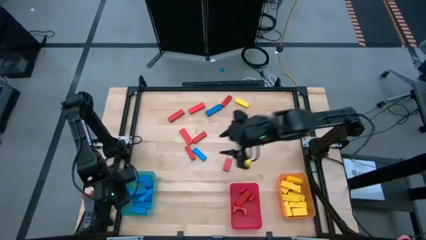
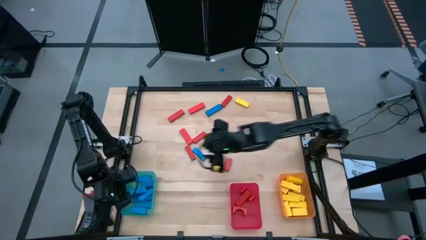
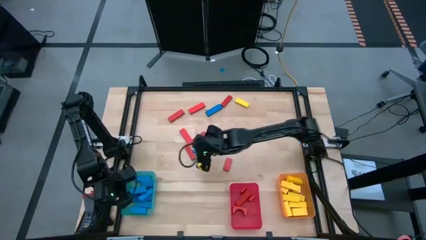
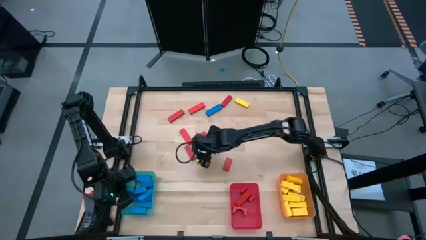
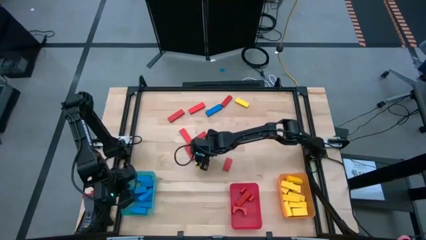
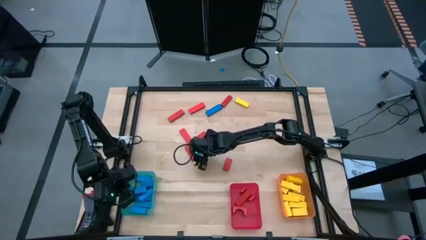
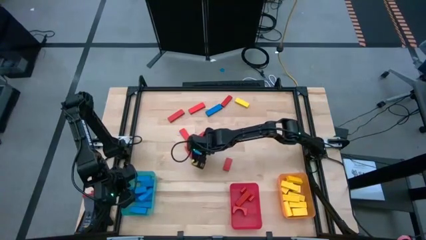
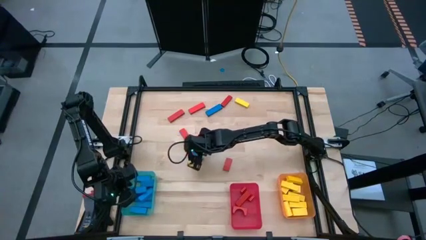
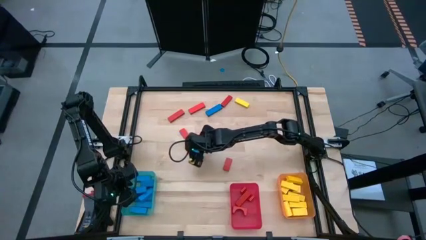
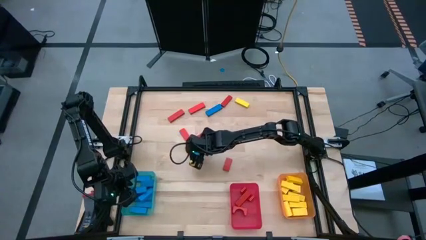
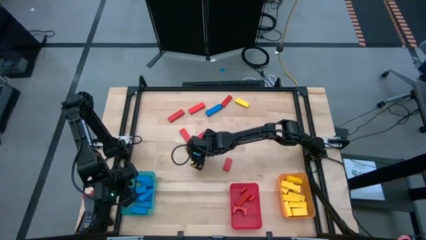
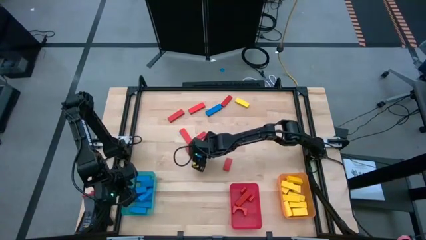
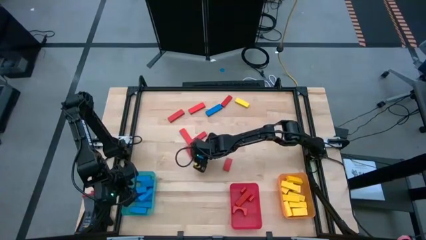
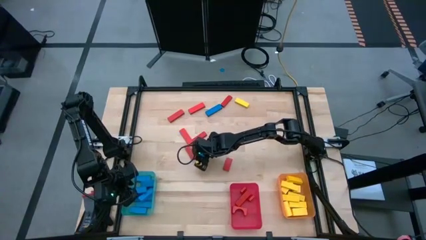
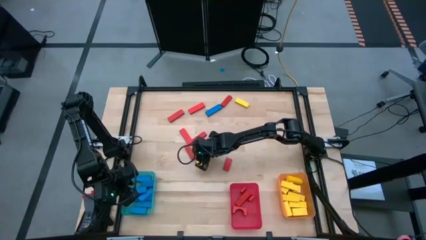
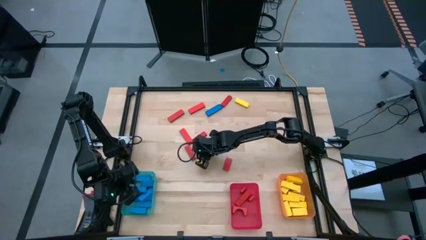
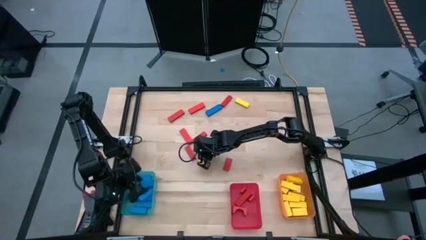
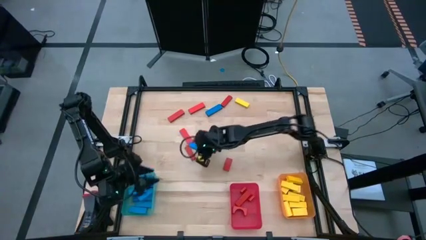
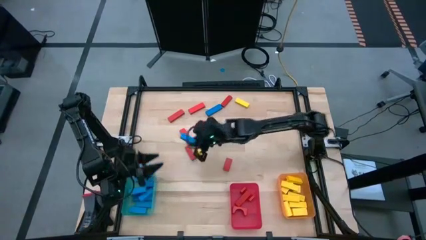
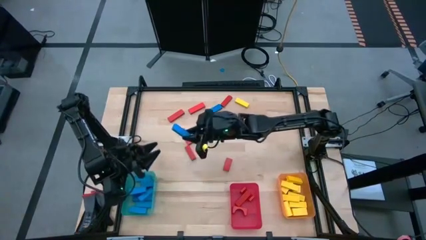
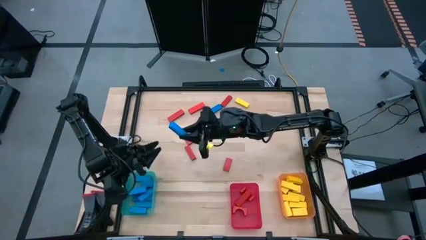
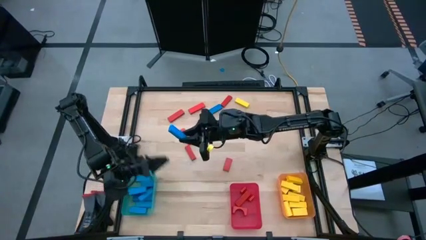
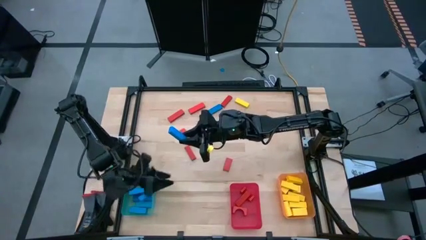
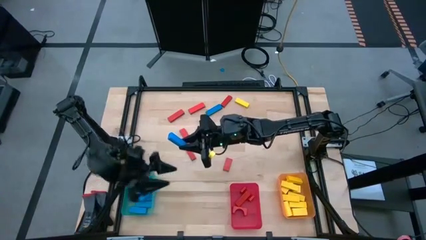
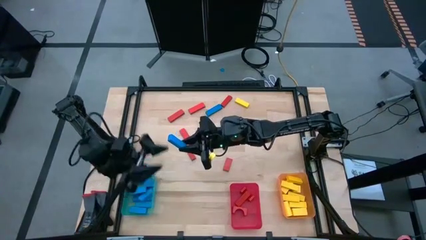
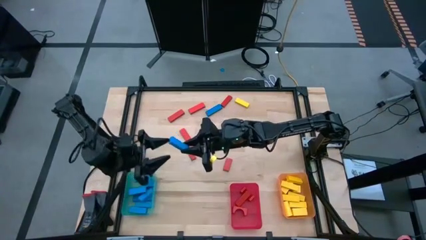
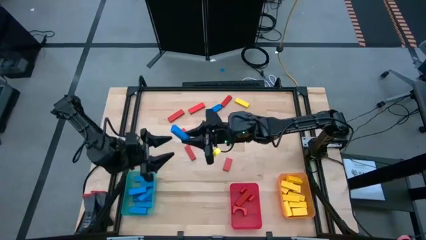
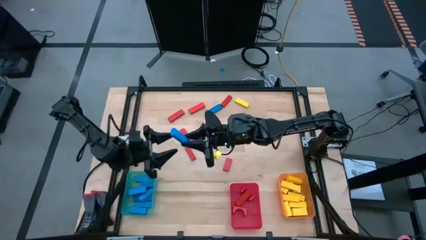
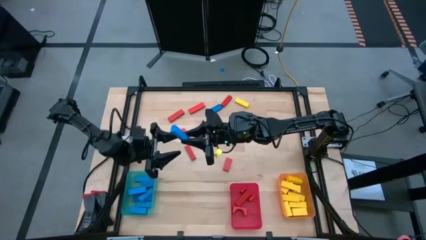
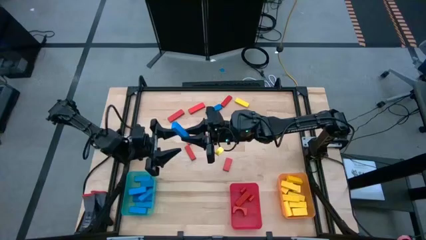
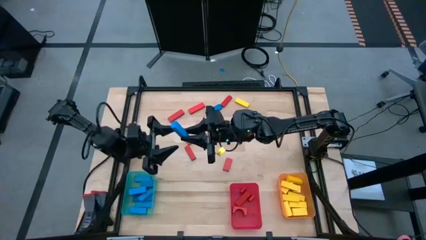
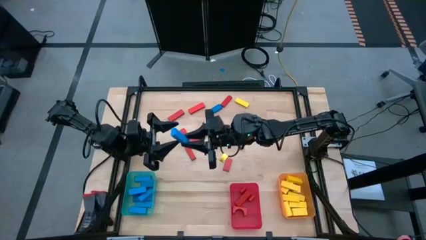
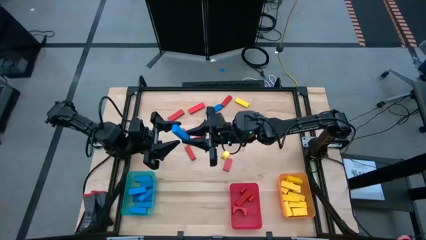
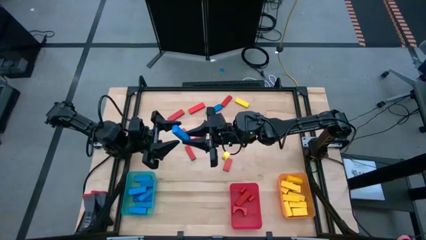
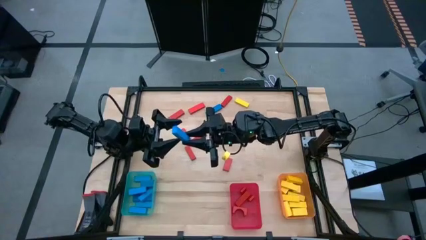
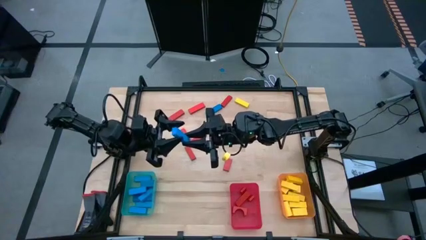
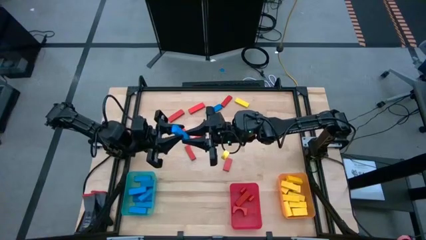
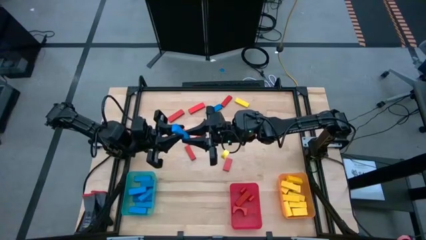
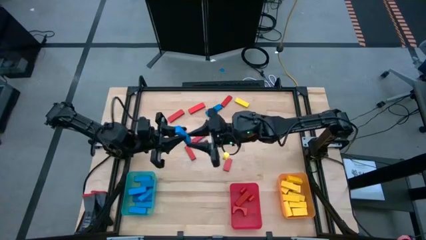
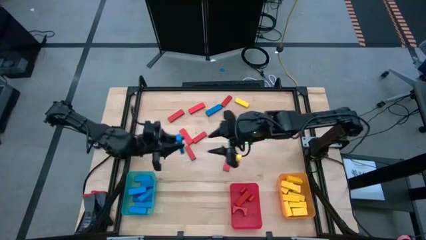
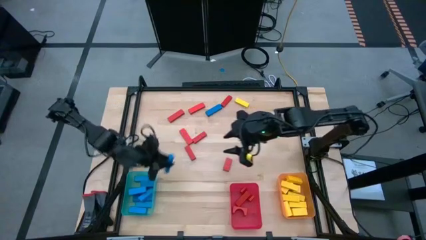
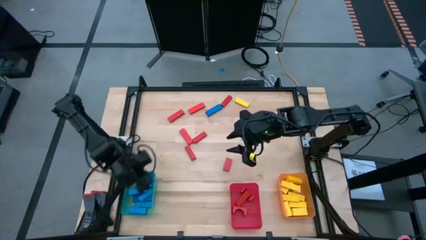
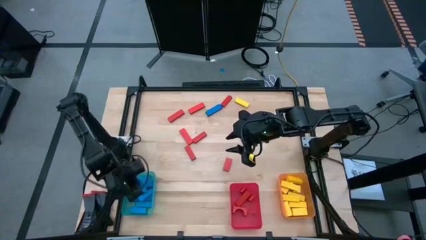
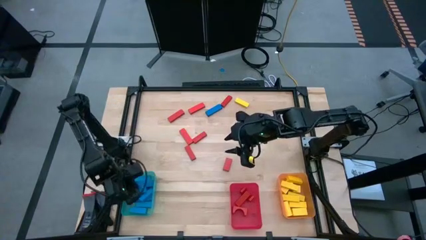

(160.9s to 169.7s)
Task: Sort blocks
Put the blue block into the blue bin

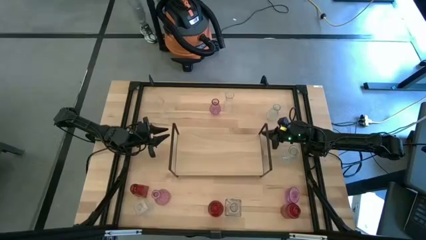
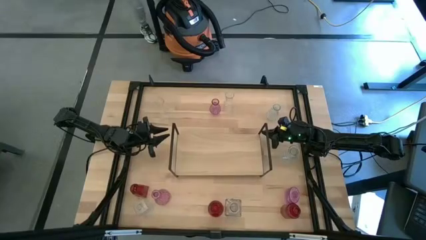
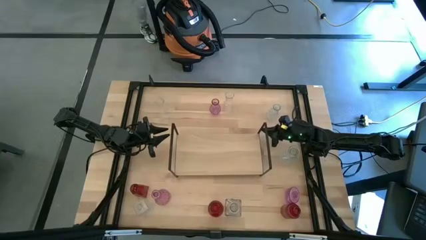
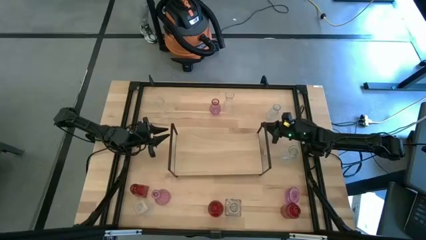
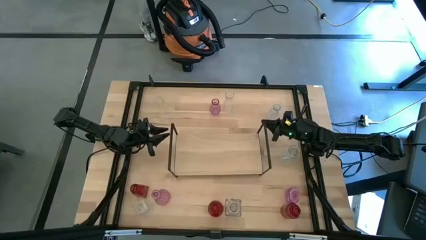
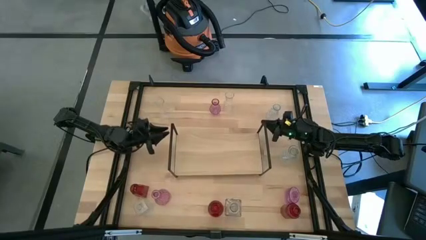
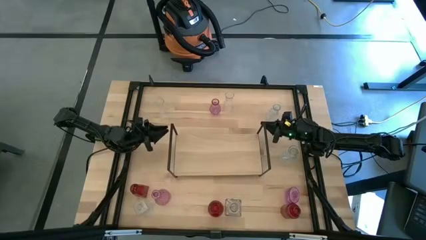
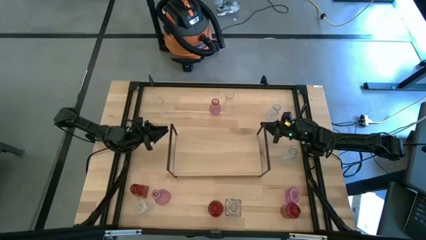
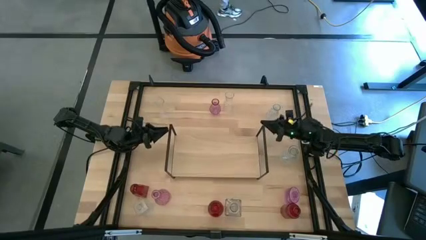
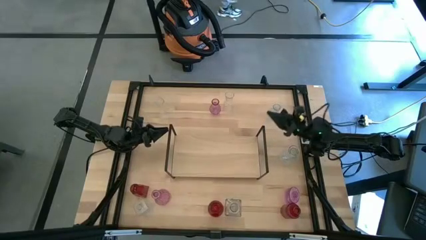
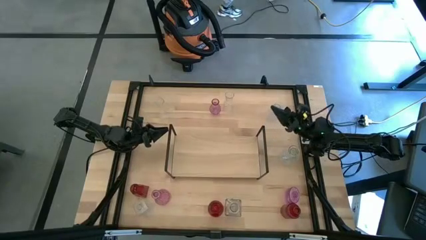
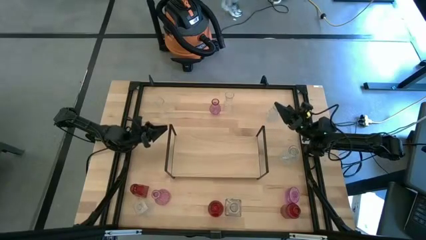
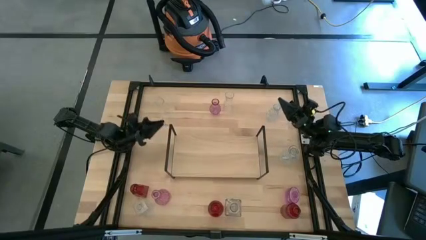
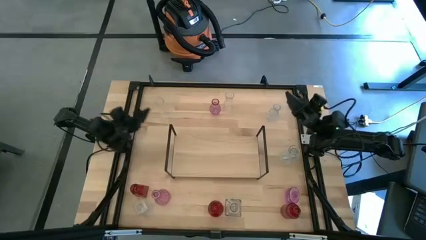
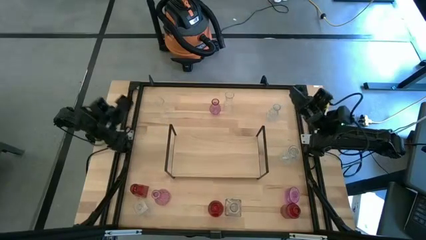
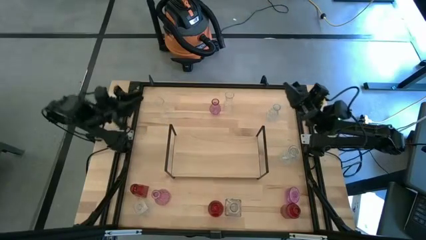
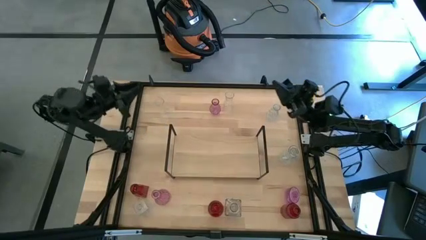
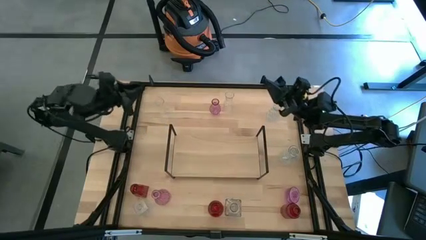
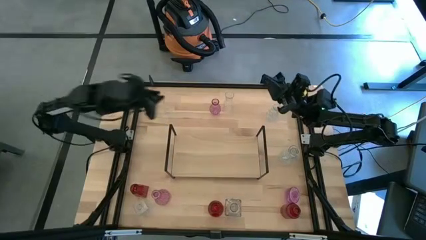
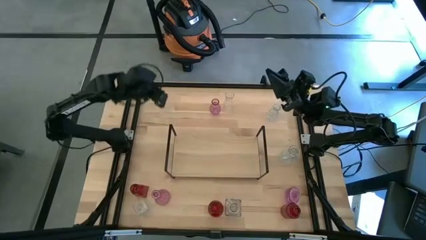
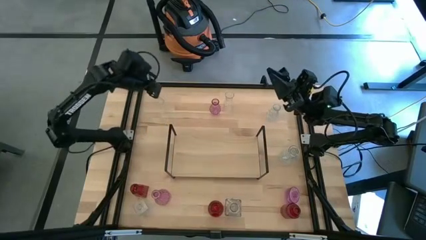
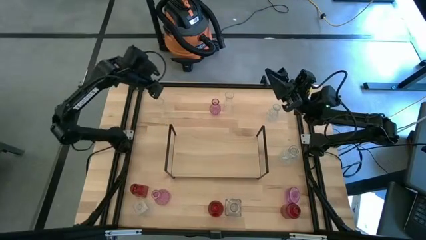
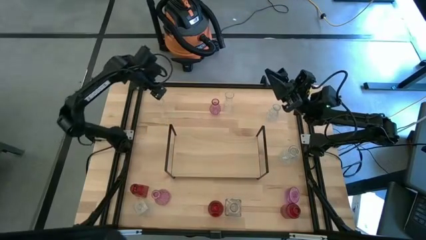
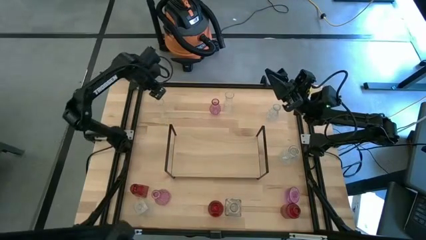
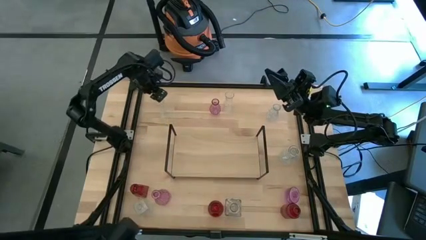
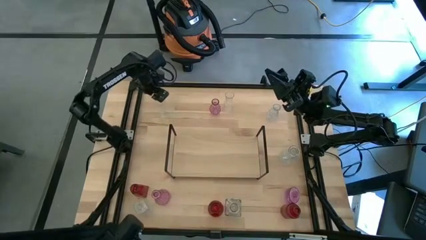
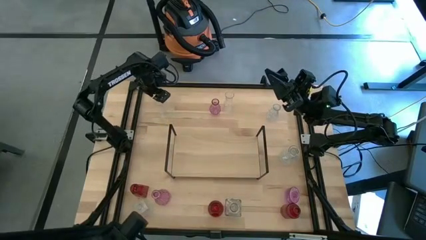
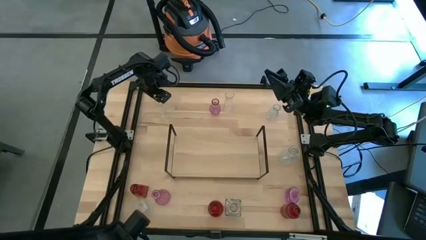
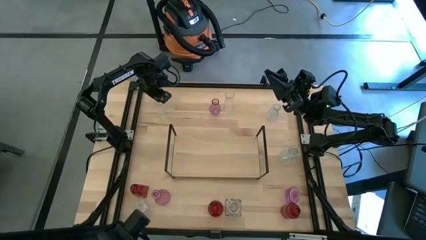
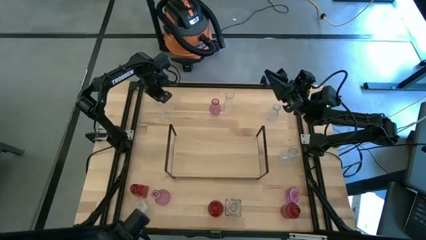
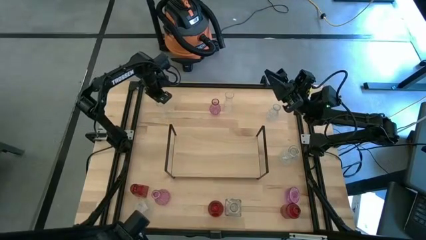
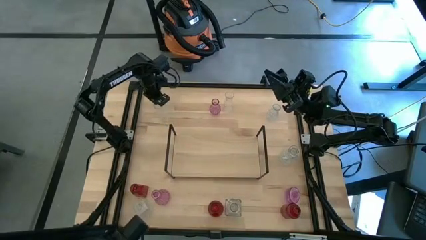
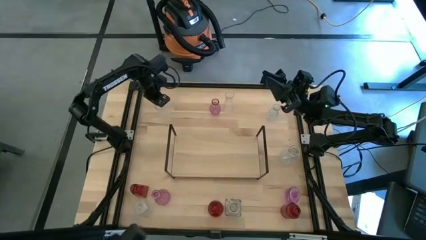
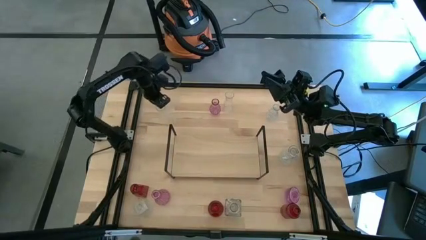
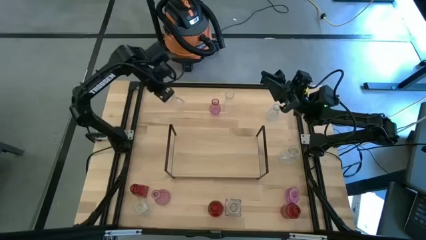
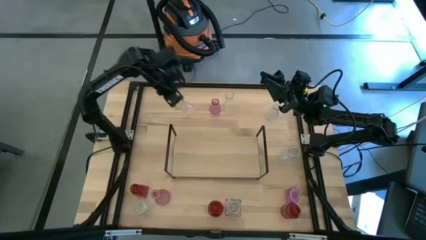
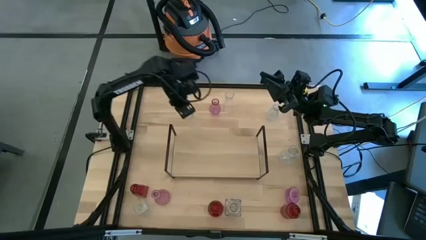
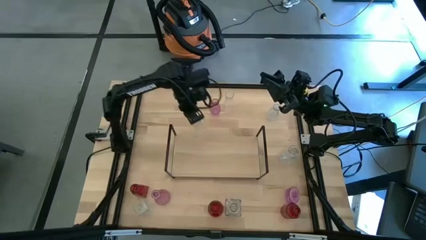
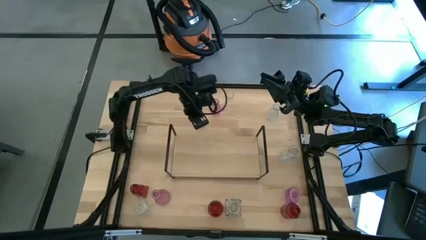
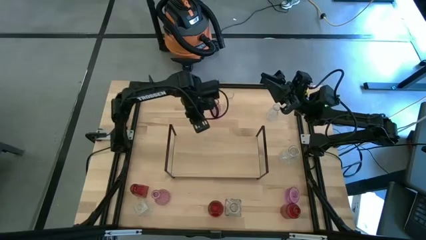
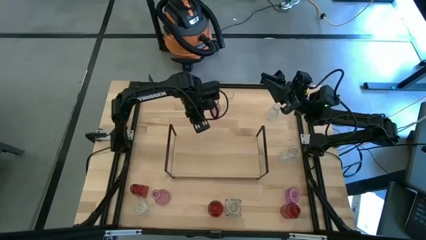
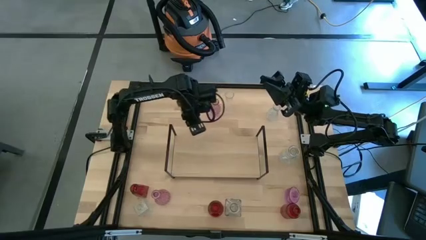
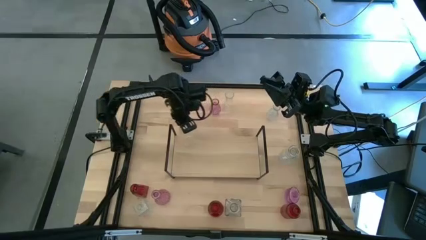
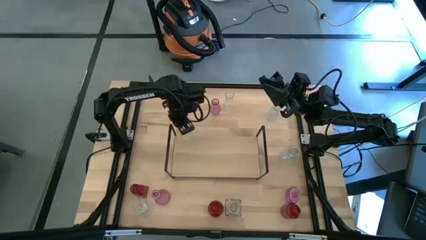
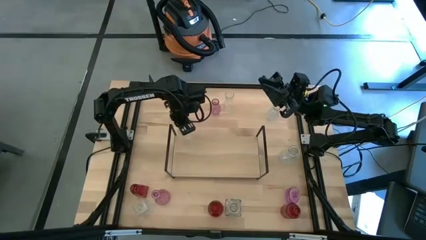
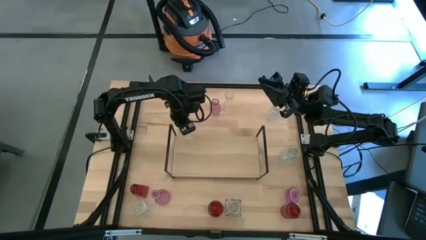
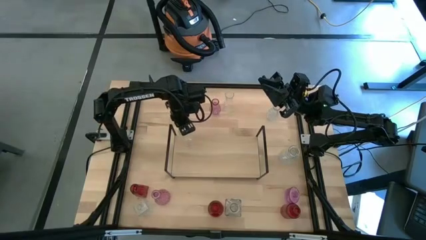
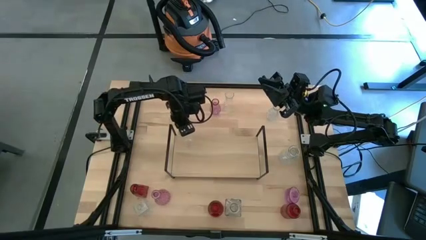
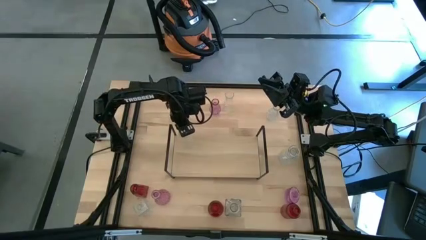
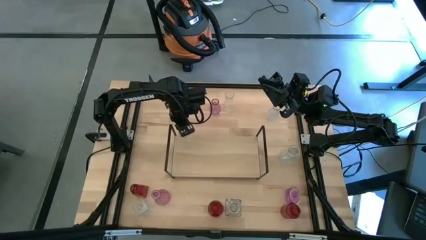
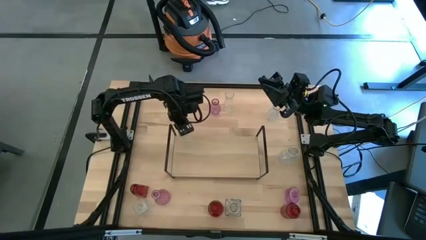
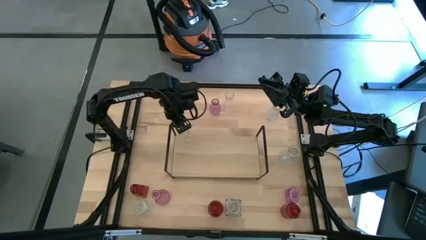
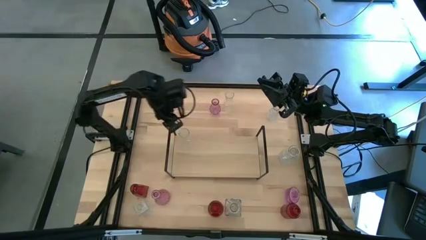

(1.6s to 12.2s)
Task: sort vases onto shelf
Put the transparent flower vase on the shelf
